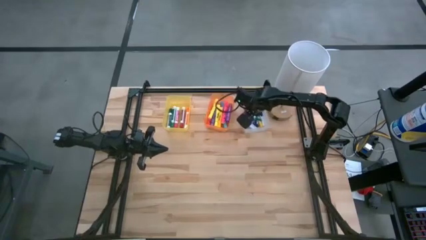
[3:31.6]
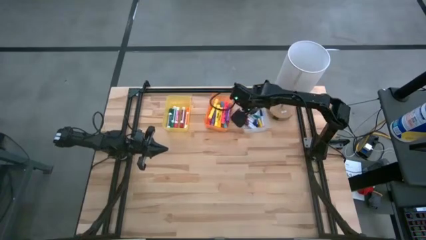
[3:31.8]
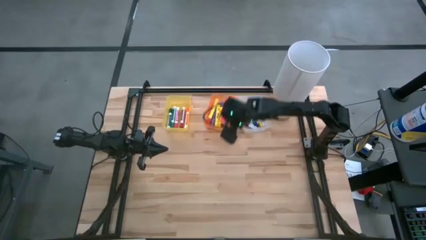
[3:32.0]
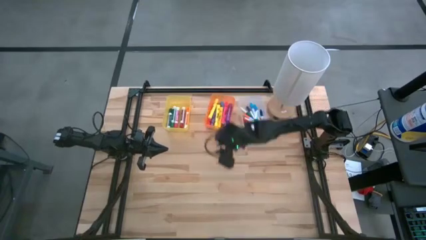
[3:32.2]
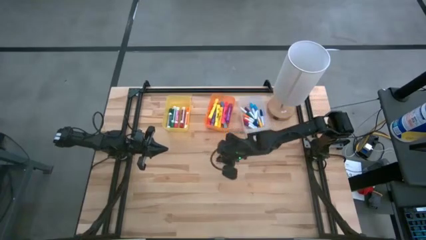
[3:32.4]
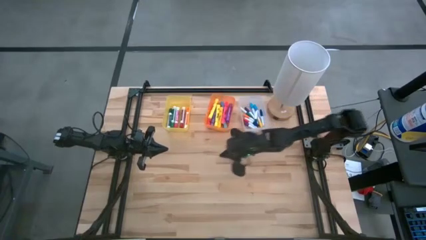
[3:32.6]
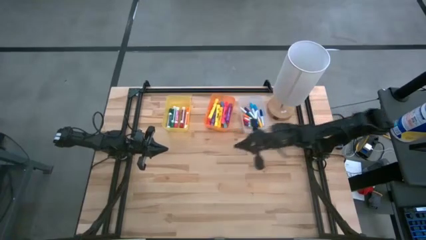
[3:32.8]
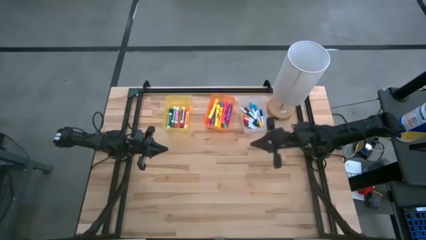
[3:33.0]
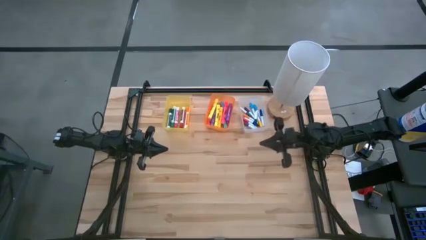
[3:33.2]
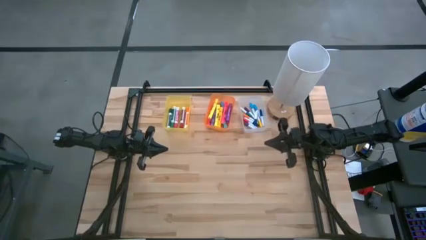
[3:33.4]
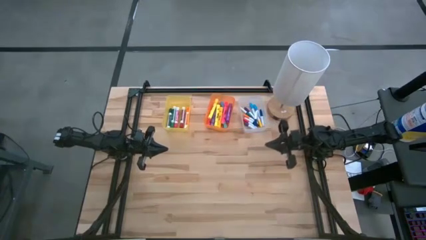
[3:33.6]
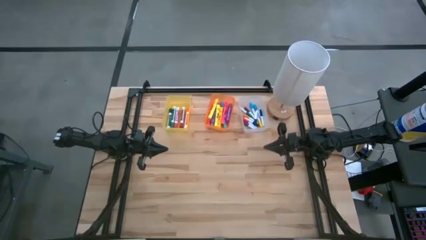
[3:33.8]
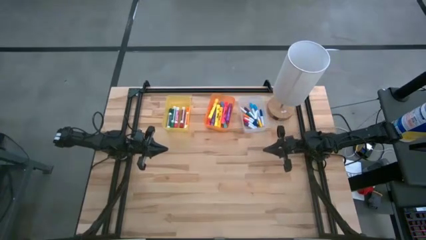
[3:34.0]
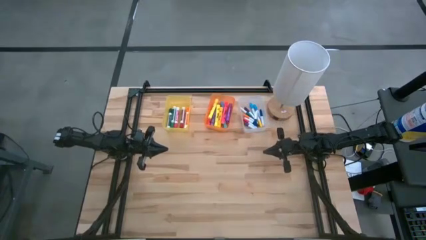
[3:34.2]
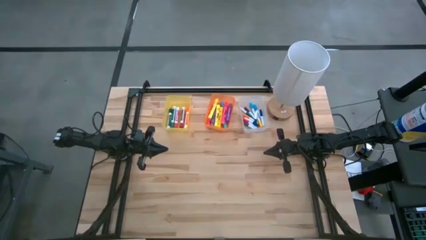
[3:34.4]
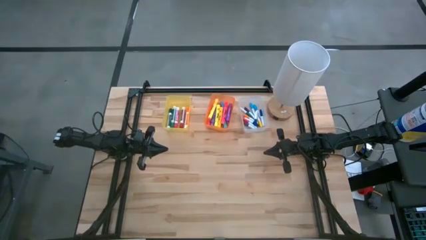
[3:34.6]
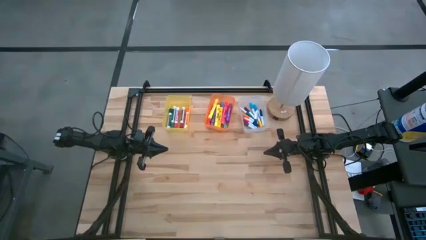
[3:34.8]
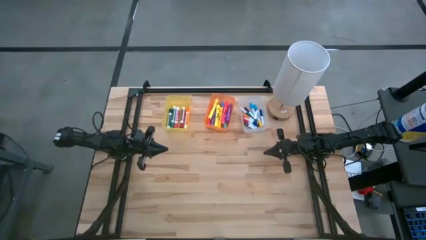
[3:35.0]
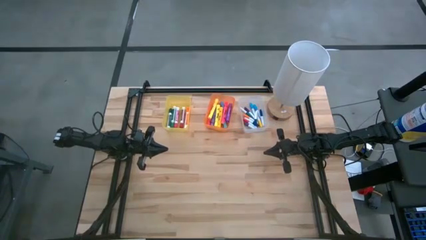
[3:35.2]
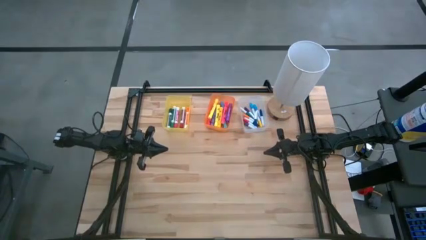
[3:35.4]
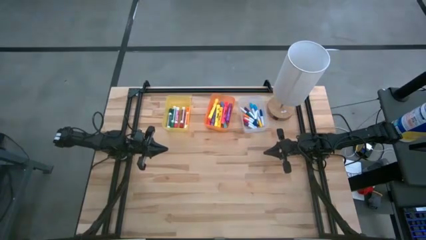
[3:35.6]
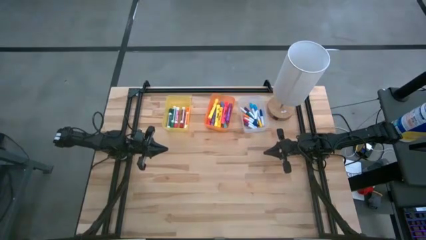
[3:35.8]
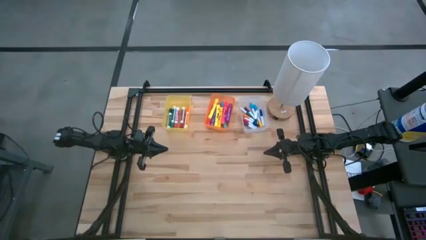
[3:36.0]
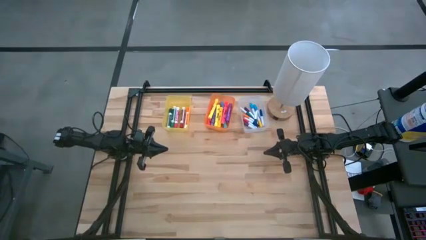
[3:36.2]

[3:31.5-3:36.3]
Task: Pick & Place Markers
Return to Home Position

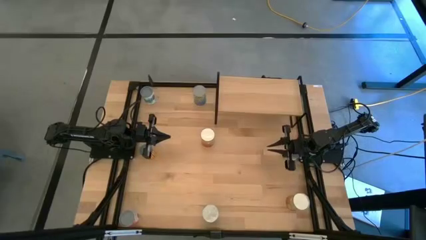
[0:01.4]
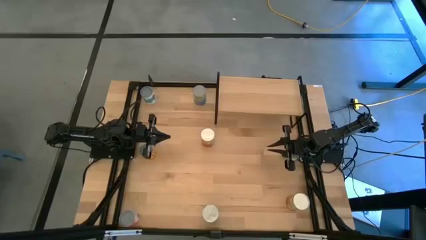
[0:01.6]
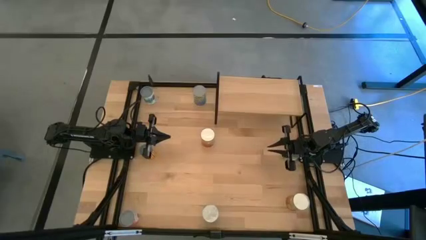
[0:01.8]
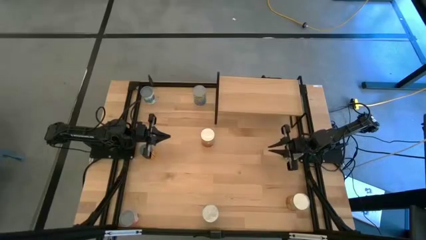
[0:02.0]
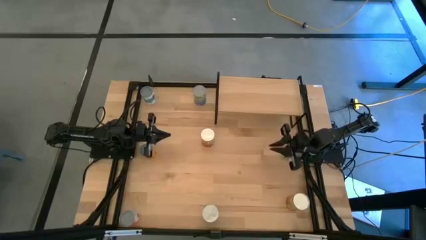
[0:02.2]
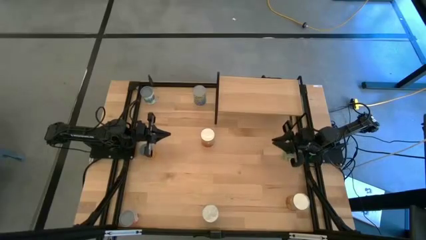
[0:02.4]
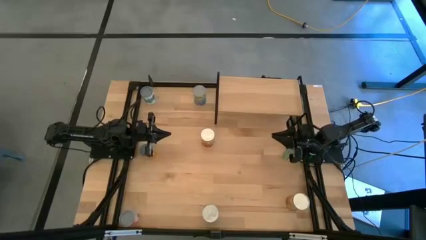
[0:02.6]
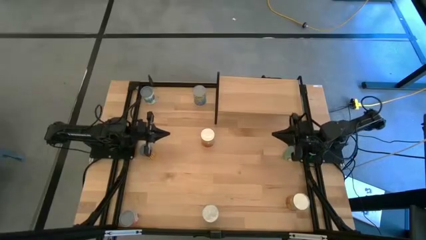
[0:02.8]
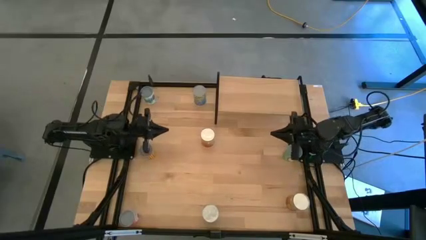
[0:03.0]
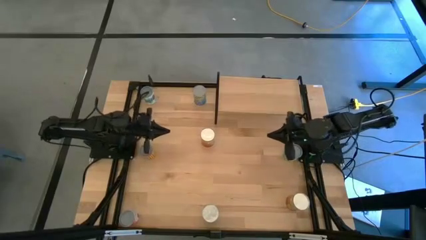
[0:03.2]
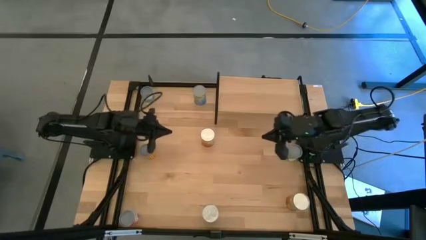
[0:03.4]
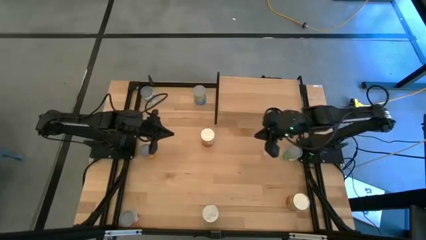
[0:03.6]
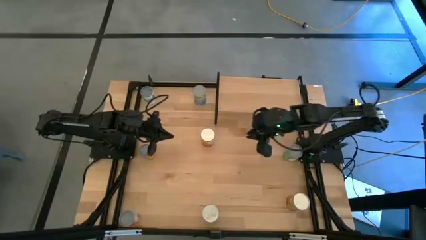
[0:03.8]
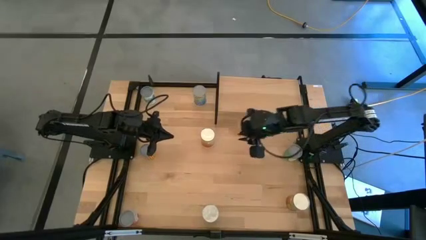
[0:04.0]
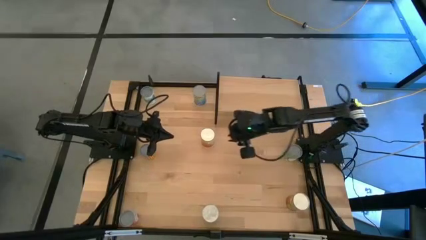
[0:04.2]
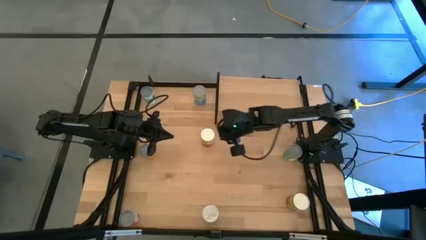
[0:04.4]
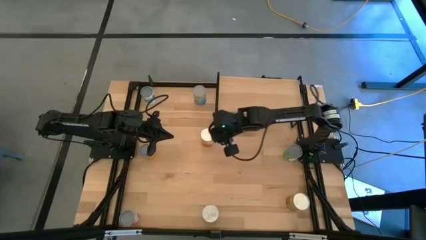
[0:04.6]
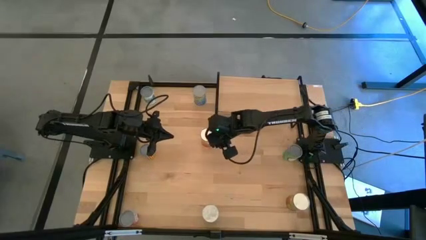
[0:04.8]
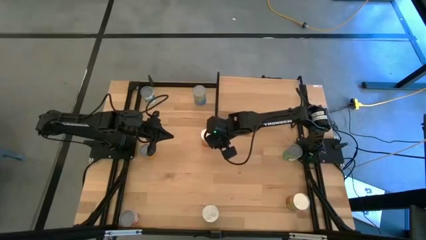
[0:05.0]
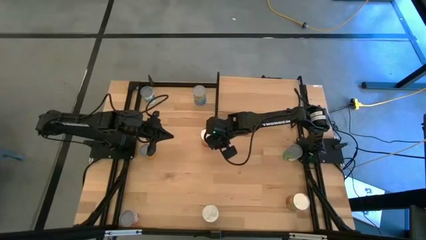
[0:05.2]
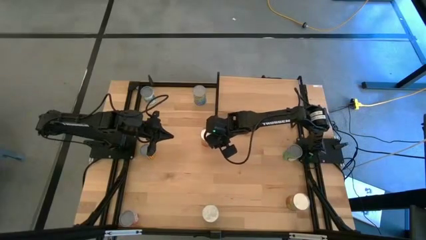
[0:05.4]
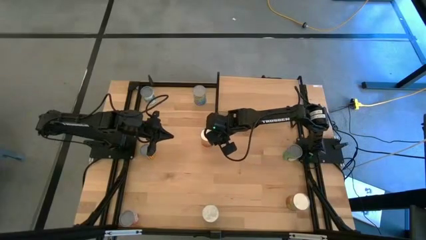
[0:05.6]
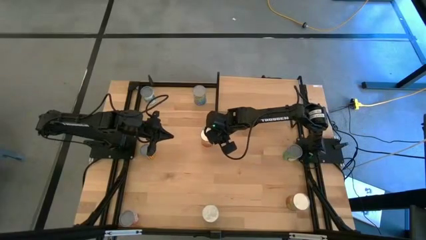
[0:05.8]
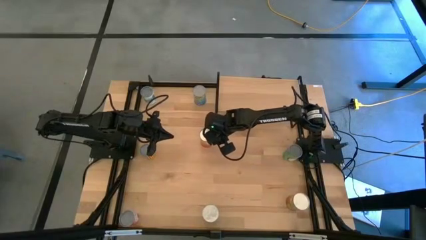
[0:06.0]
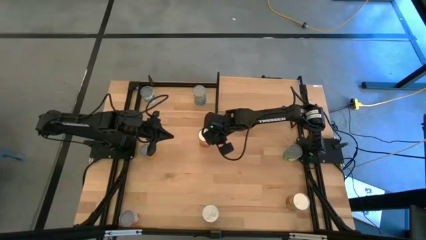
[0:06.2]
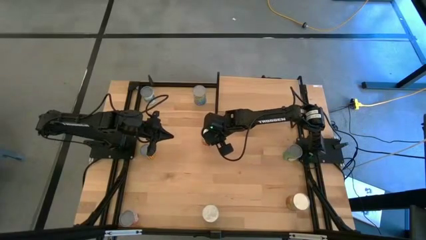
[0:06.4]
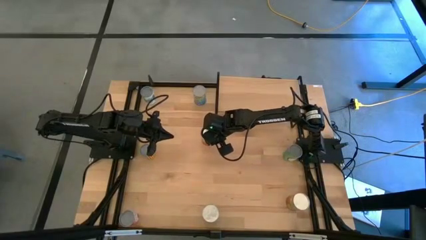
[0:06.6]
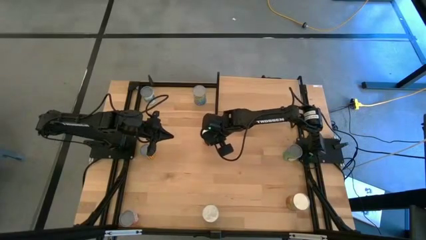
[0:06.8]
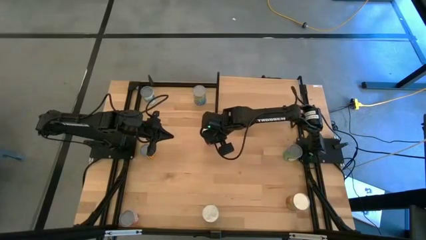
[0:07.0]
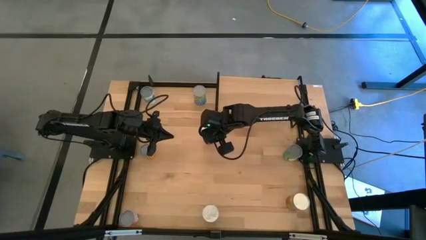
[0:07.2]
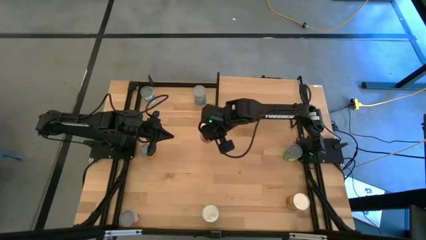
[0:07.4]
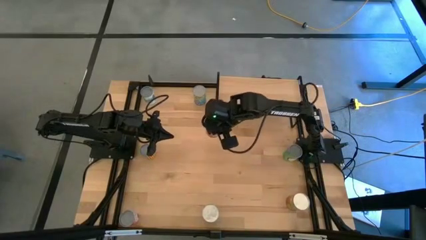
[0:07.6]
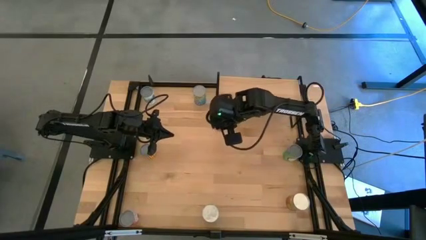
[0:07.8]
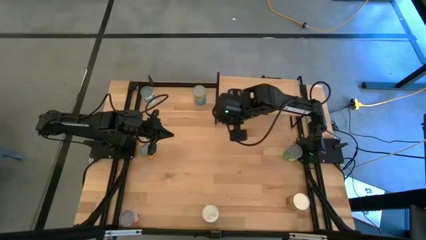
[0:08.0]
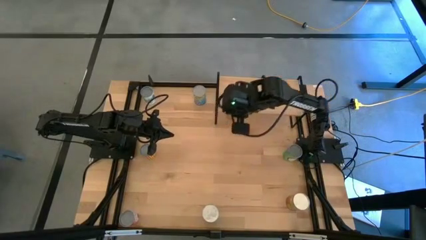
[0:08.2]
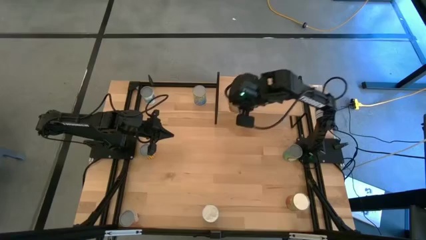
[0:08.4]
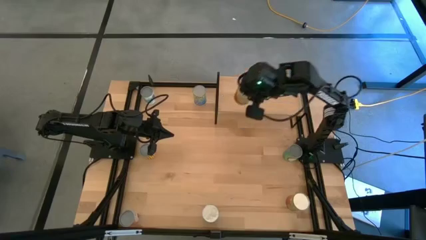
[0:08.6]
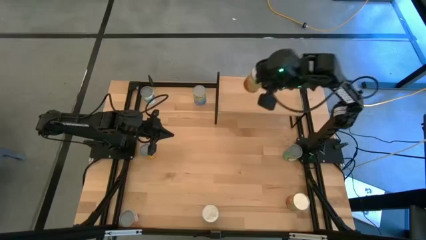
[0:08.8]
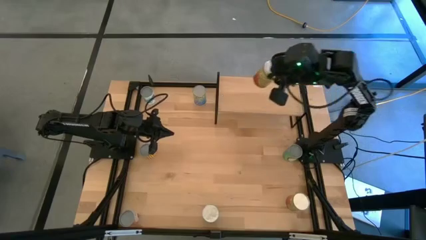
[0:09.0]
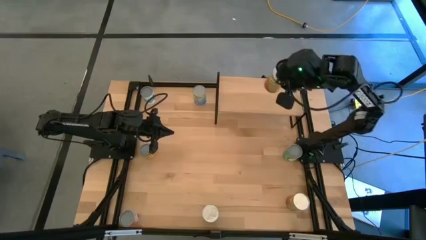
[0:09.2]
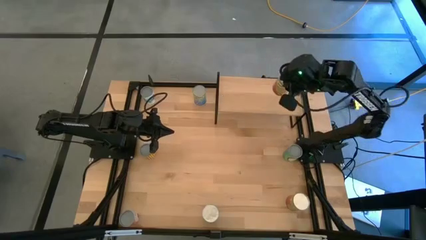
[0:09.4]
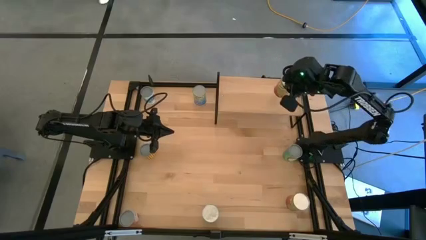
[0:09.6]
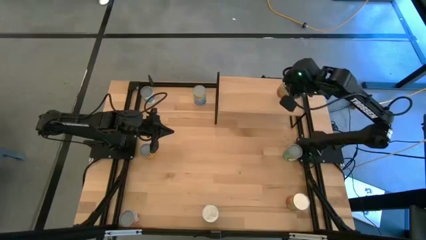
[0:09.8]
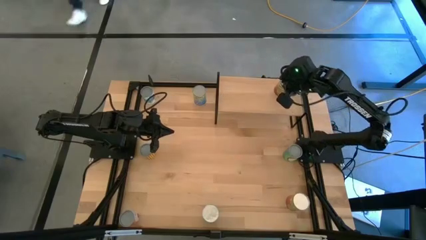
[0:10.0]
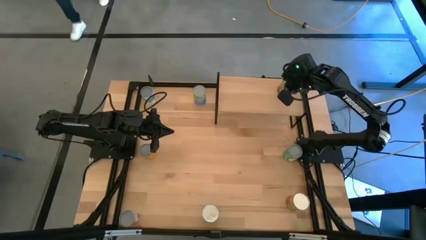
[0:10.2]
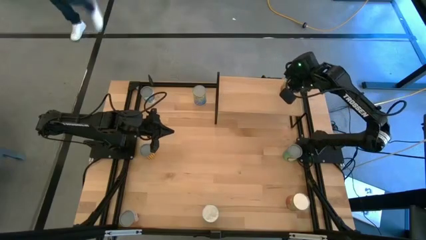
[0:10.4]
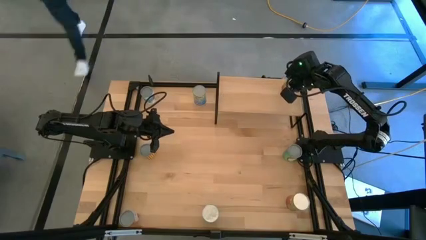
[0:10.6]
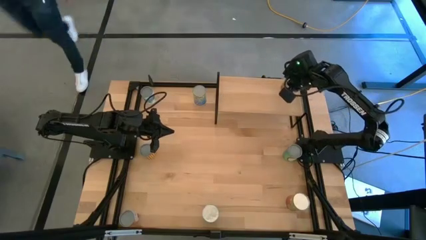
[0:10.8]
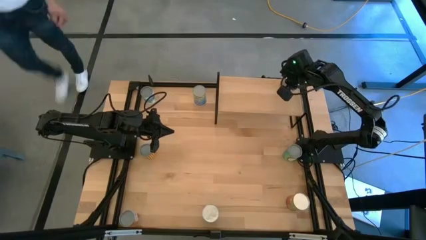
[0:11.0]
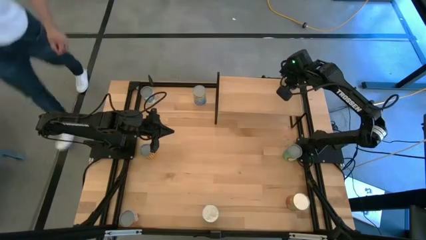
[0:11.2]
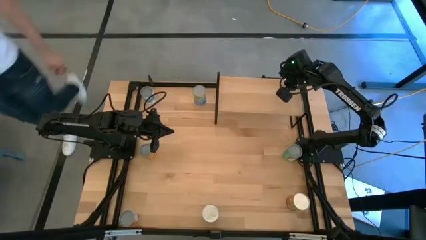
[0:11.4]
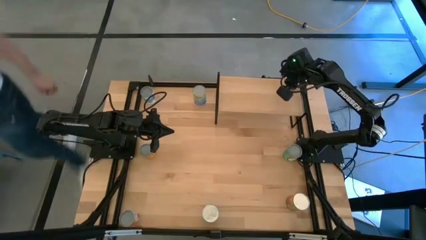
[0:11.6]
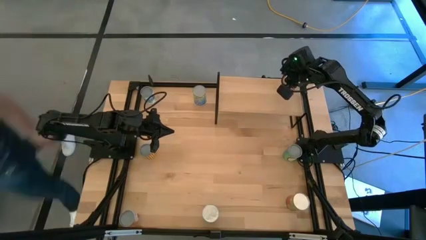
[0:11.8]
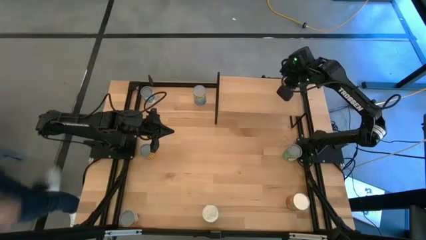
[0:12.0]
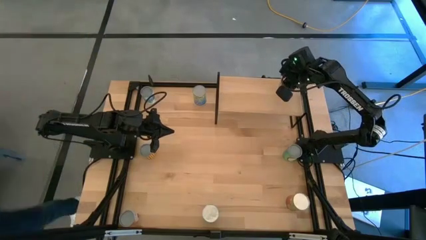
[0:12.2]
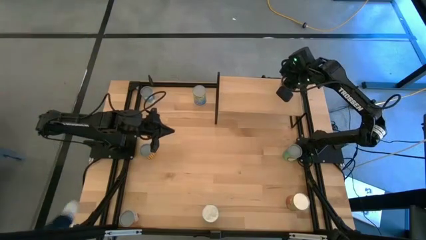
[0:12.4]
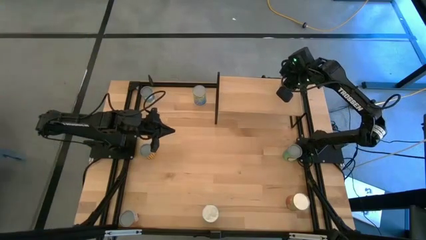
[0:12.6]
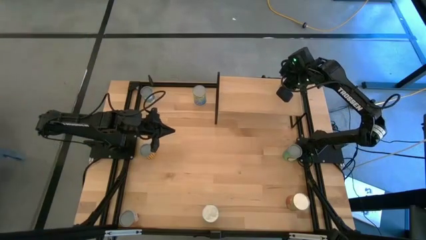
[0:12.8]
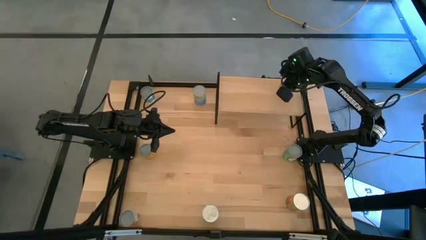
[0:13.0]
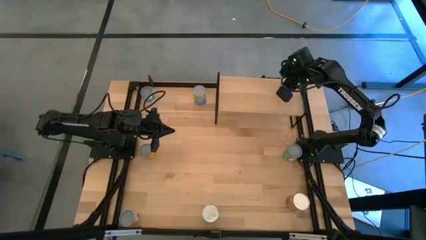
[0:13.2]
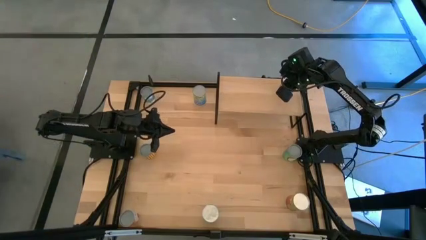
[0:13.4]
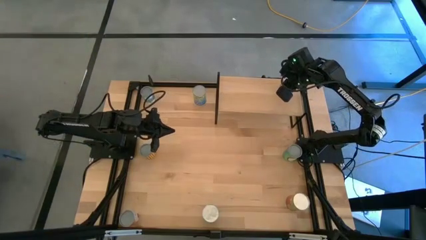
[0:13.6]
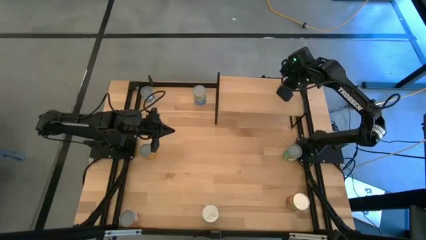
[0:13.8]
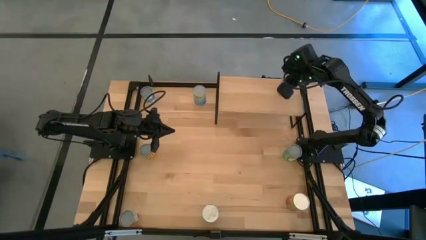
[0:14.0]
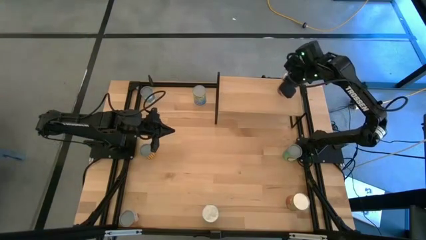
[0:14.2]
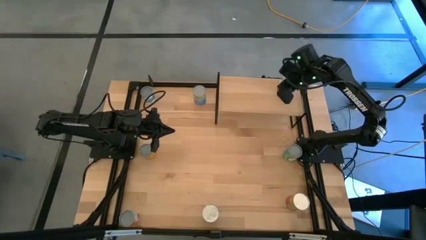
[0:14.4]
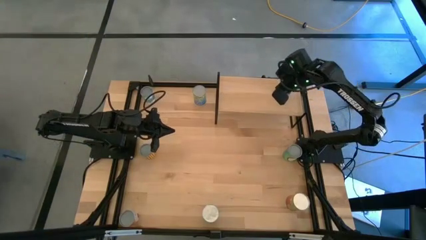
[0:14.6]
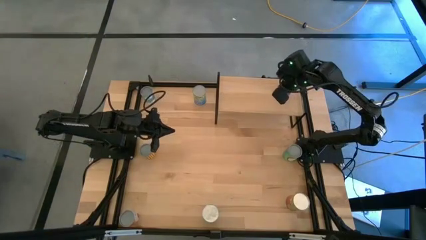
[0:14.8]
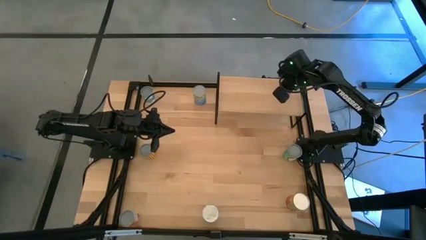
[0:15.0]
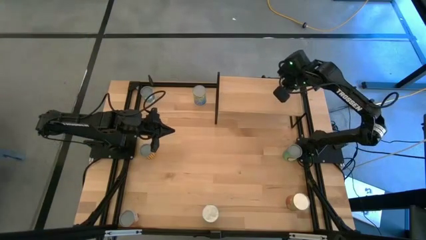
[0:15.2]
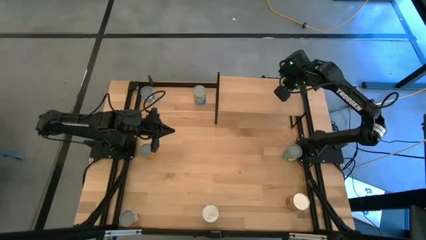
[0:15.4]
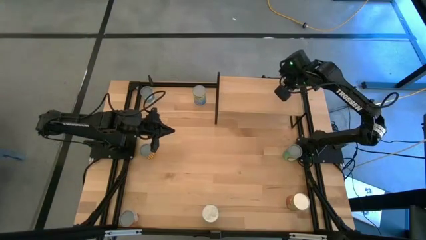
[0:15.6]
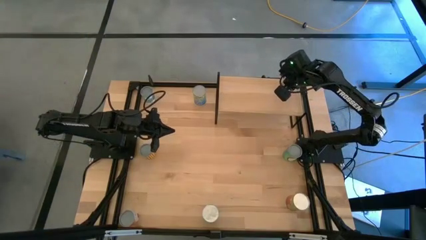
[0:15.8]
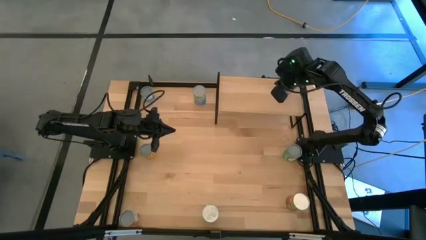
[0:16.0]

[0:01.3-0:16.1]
Task: Pick and place cans onto a shelf
Put the top orange canned good on the shelf
